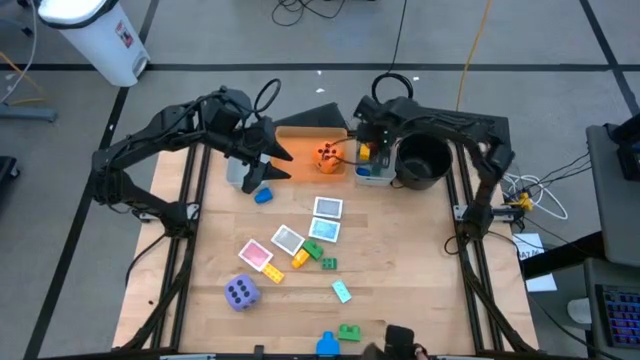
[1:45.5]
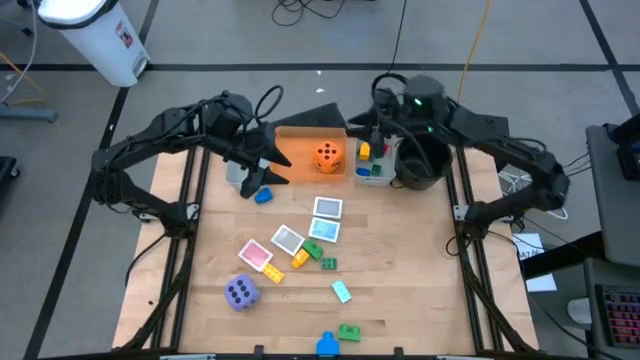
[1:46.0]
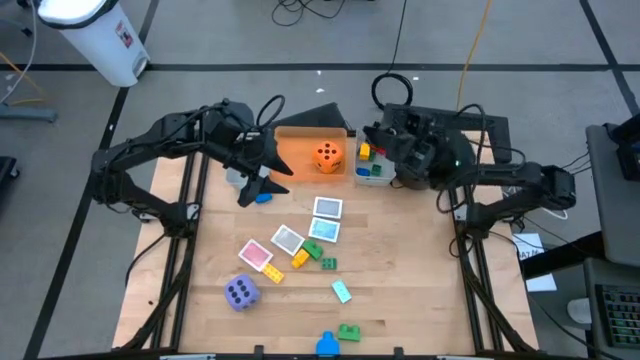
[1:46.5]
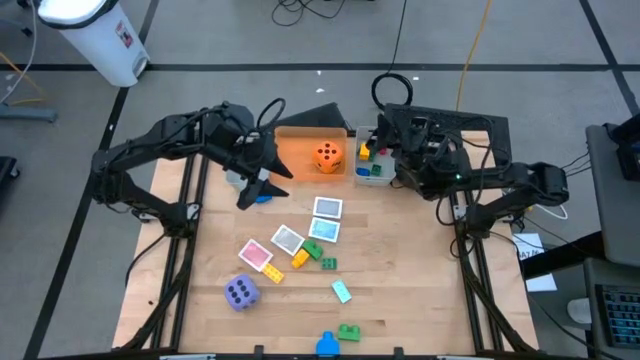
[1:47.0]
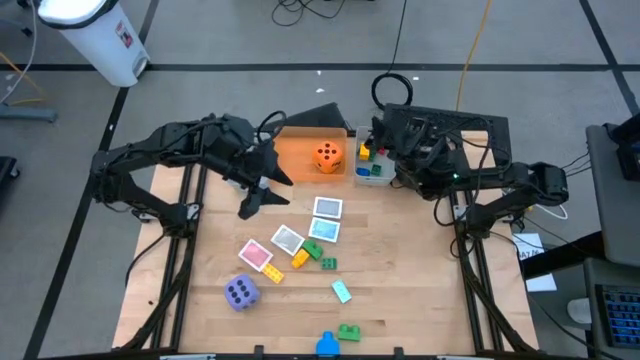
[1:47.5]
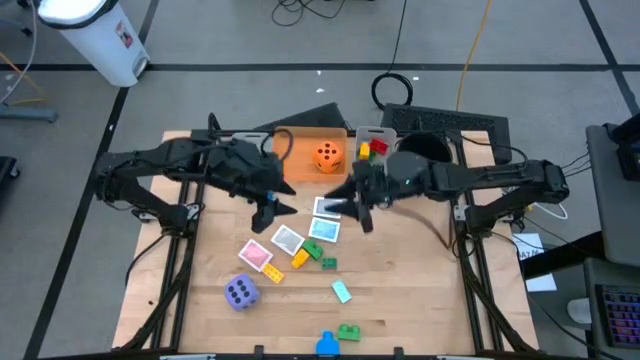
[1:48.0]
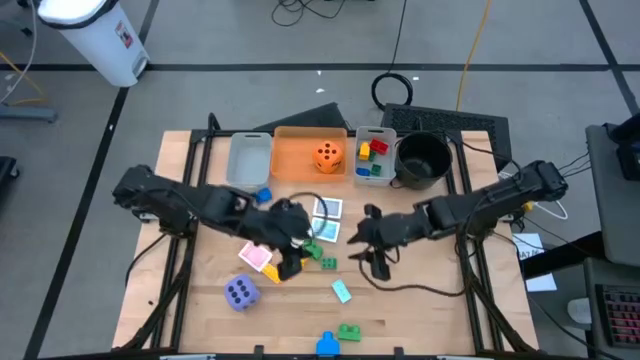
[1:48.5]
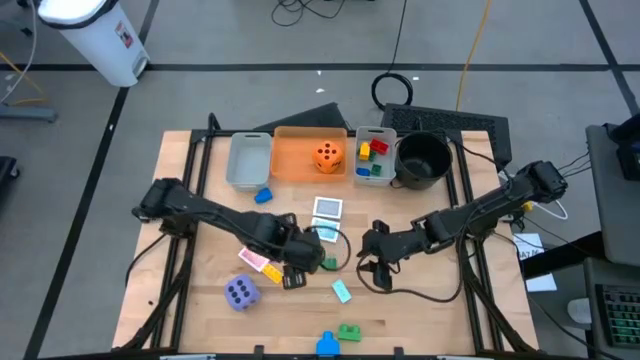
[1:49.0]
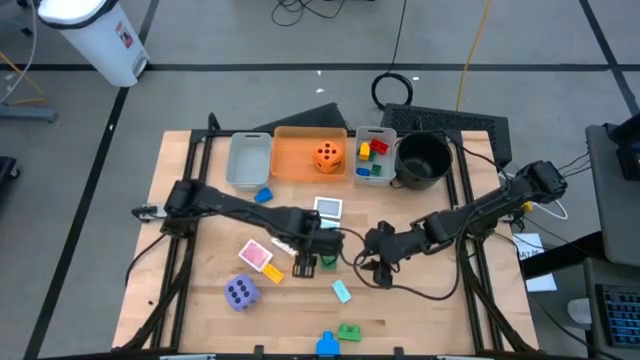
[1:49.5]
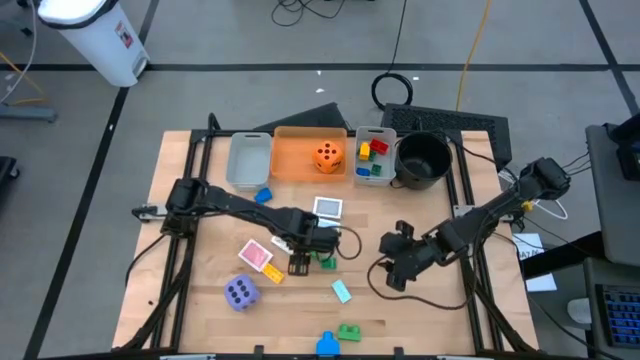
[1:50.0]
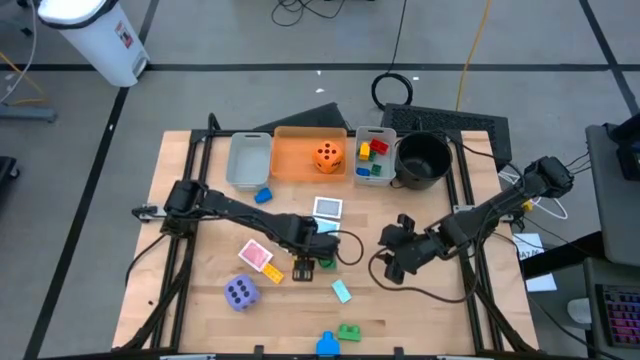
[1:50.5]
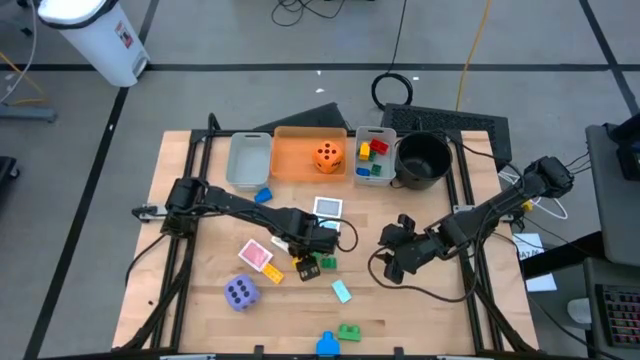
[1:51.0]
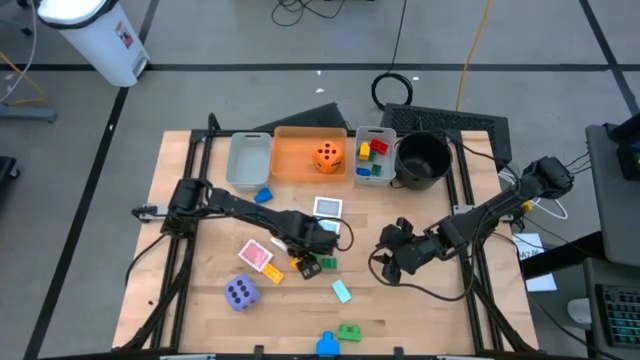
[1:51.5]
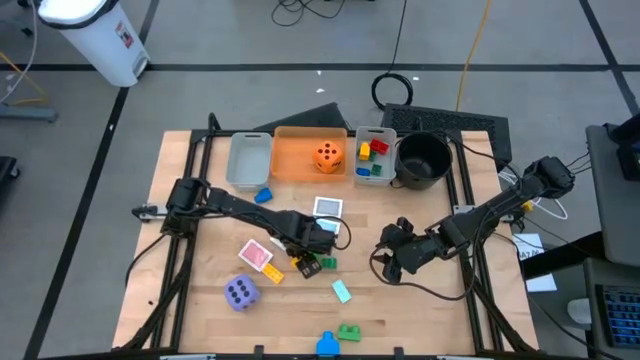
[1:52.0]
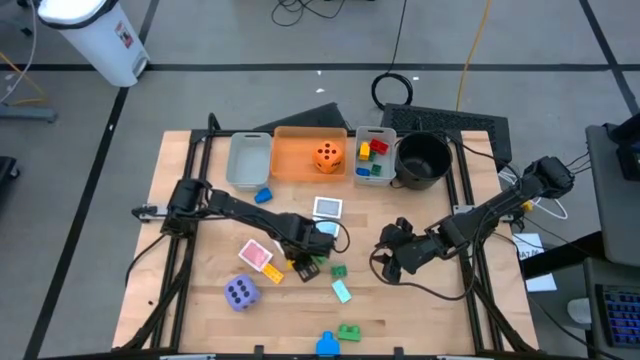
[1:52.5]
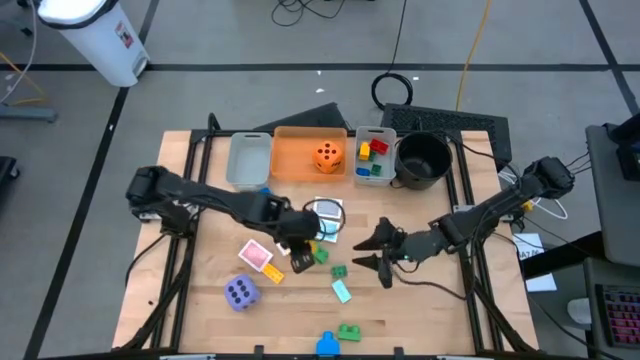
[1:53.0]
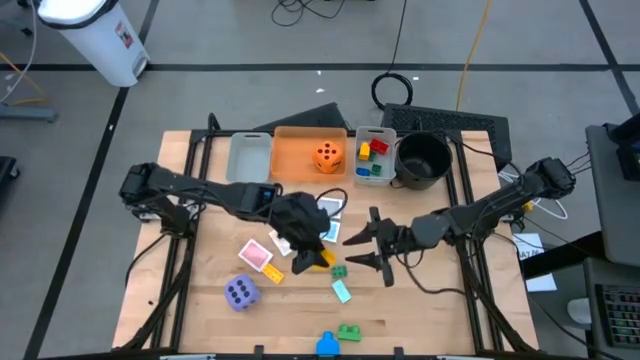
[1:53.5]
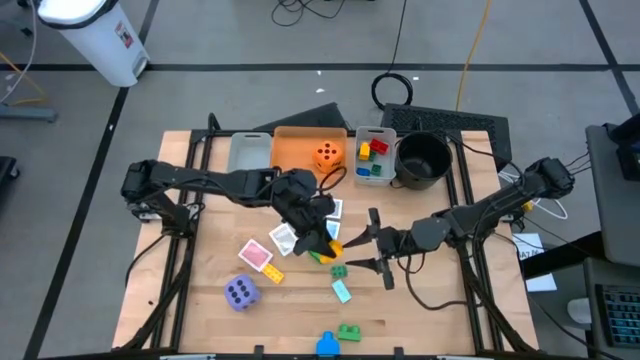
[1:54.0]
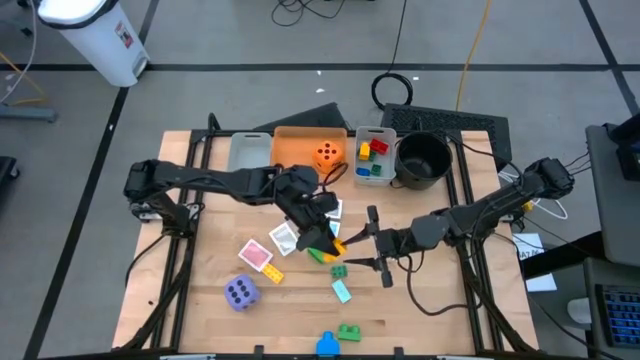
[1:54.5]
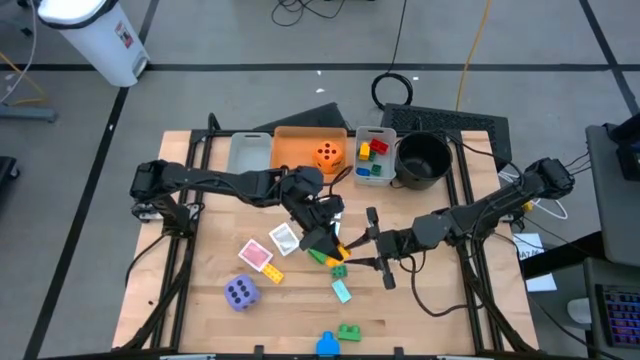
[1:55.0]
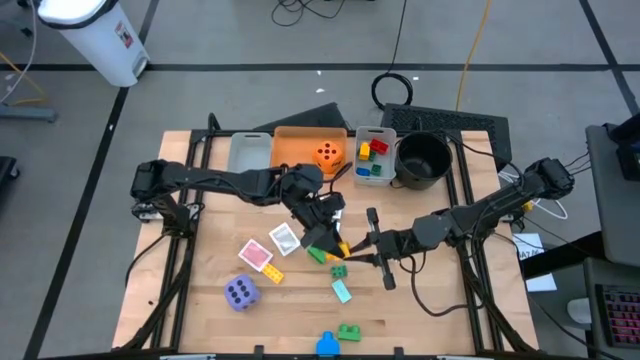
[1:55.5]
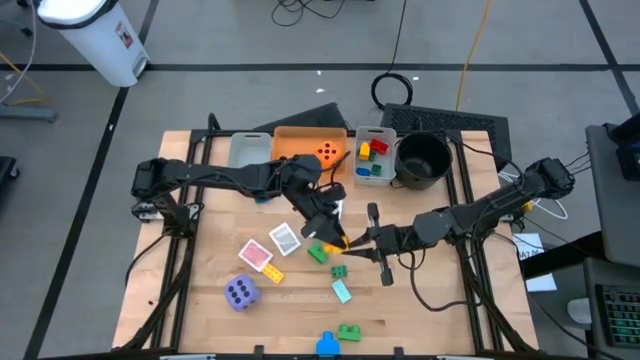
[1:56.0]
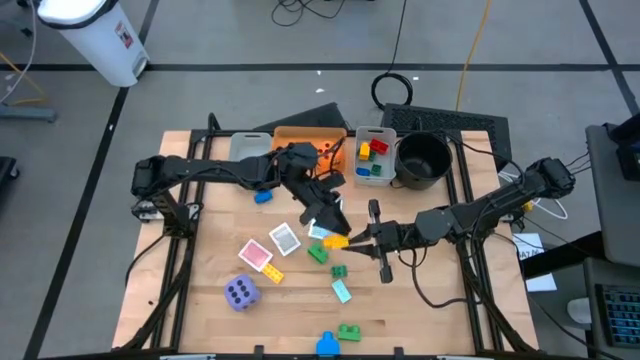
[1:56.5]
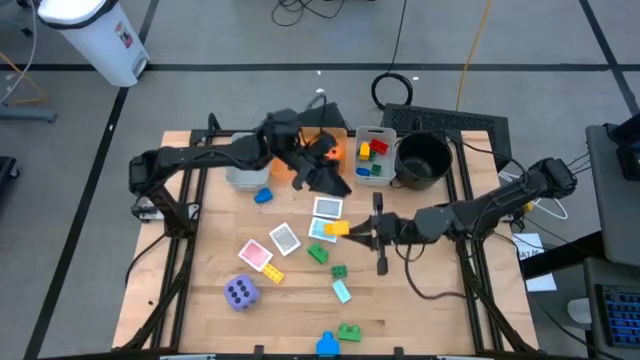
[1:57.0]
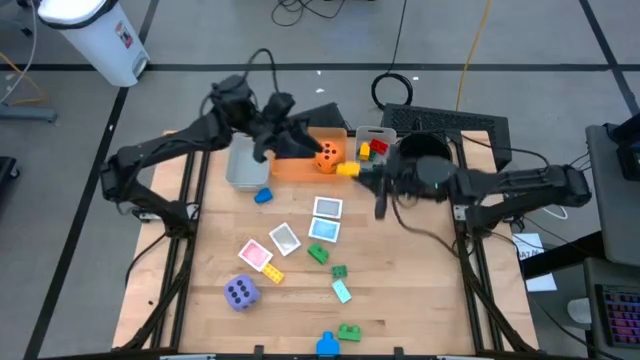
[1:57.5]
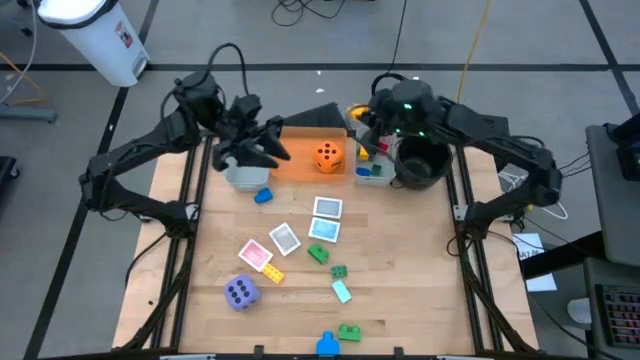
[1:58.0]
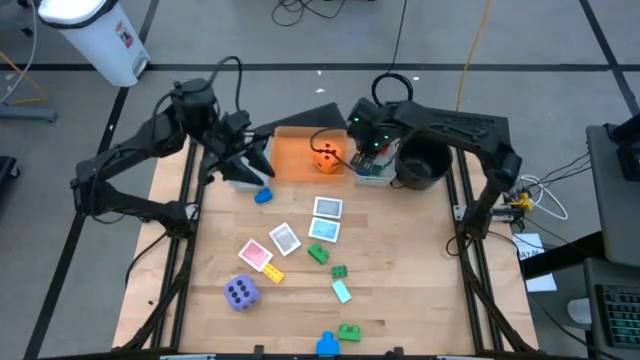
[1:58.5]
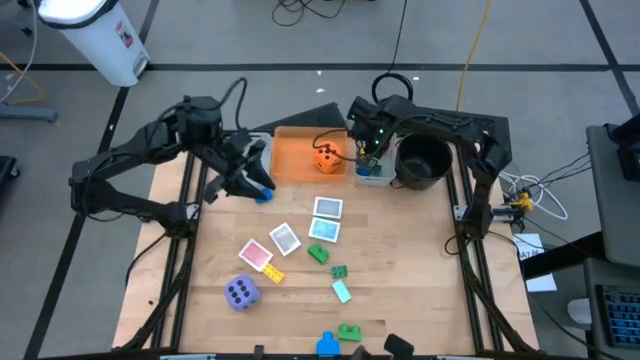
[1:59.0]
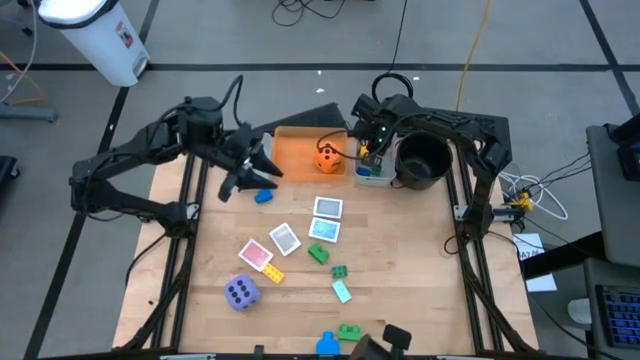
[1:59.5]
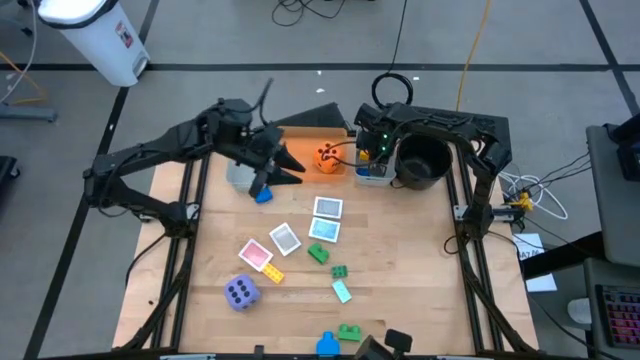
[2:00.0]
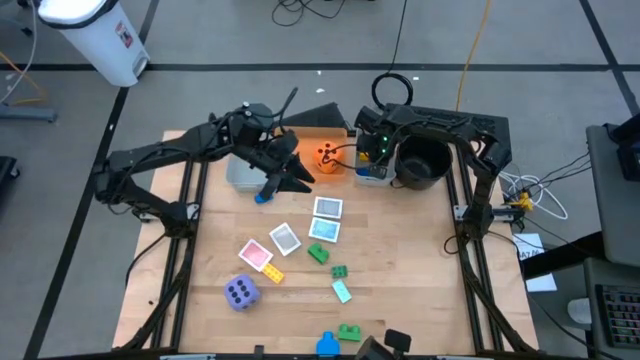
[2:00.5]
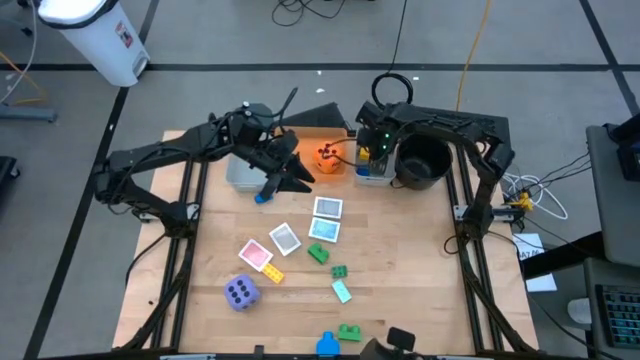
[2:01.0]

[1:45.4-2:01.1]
Task: Pick & Place Toys
Put the yellow game piece into the right gray bin

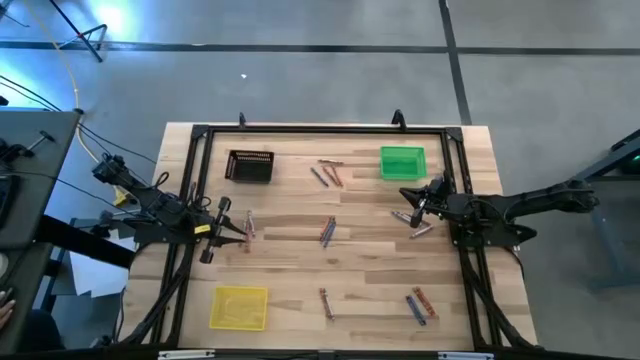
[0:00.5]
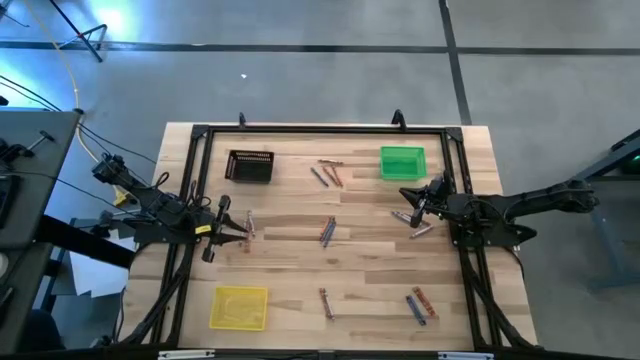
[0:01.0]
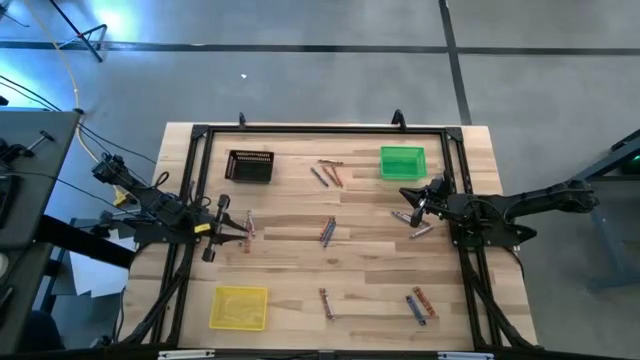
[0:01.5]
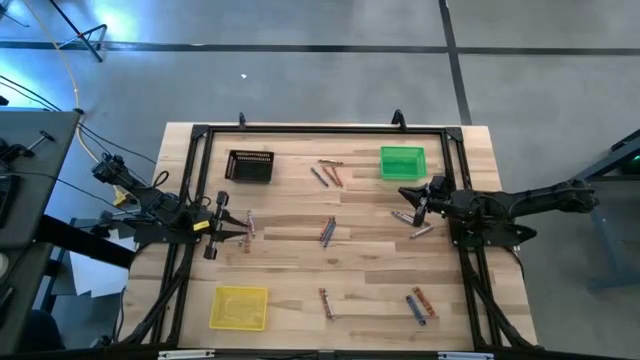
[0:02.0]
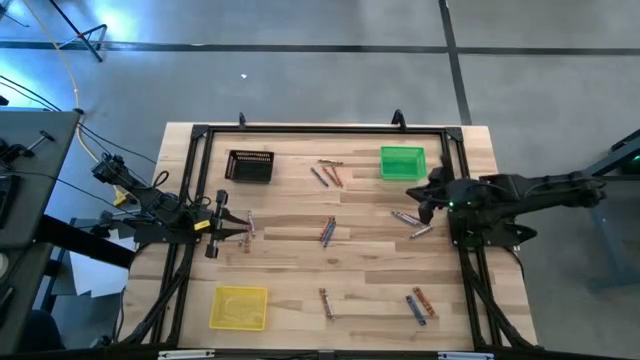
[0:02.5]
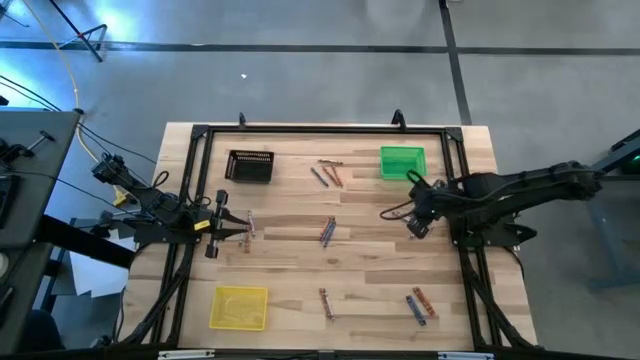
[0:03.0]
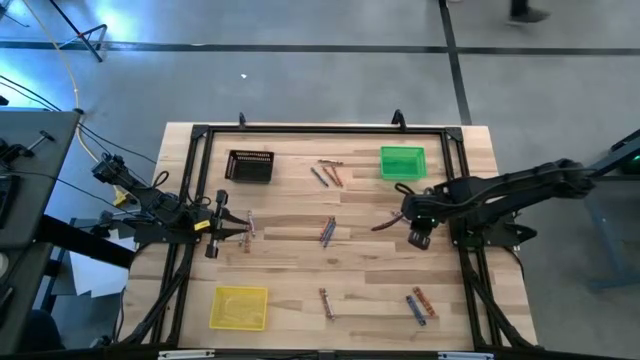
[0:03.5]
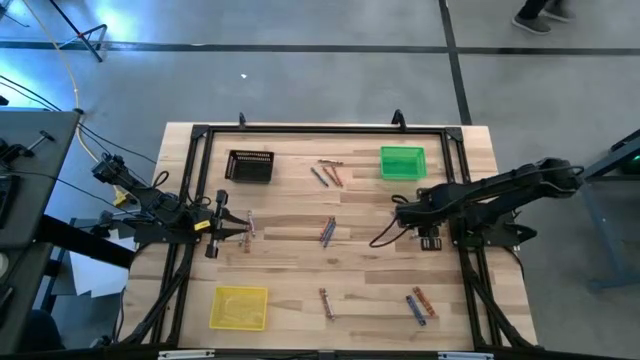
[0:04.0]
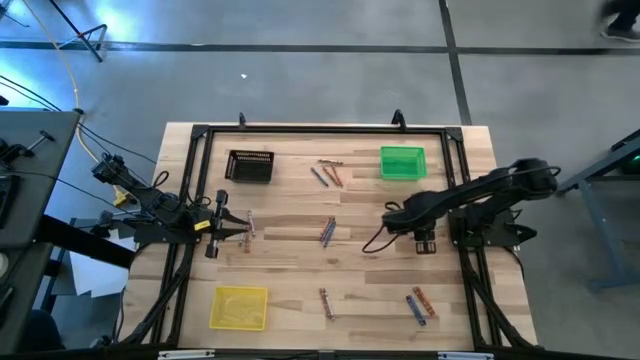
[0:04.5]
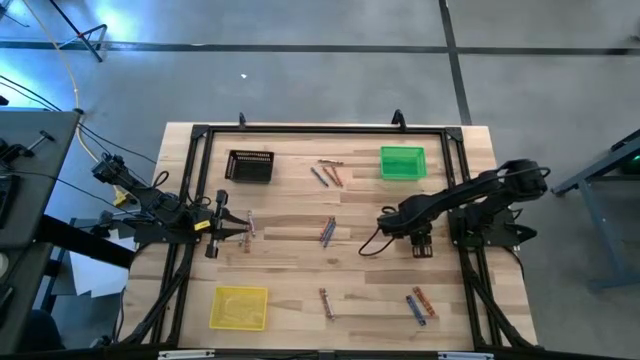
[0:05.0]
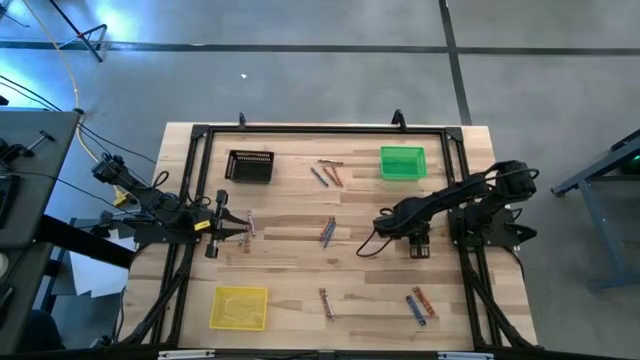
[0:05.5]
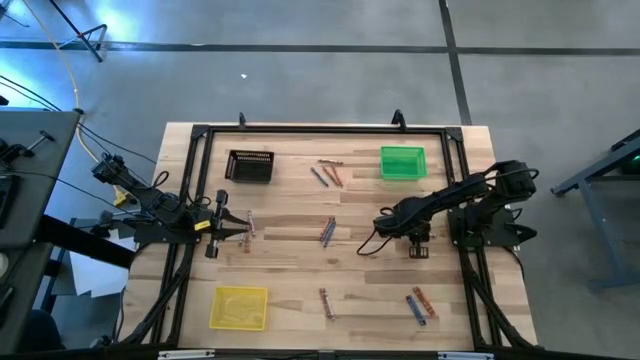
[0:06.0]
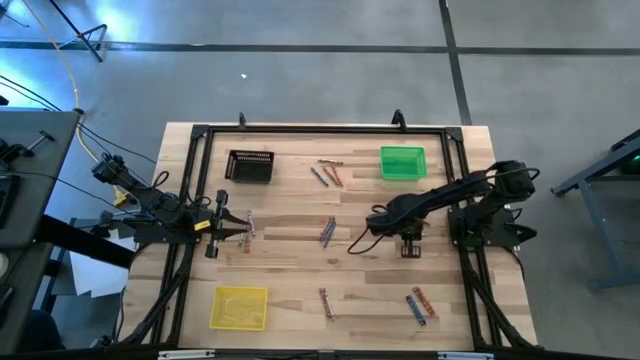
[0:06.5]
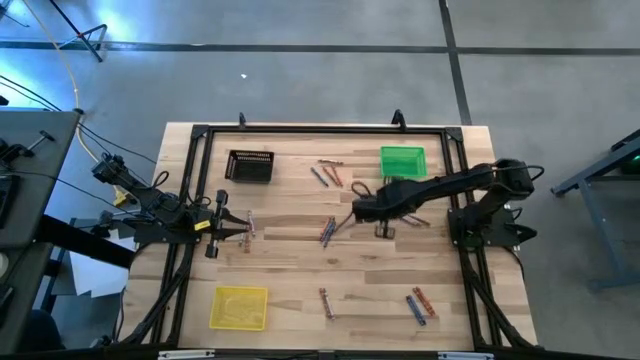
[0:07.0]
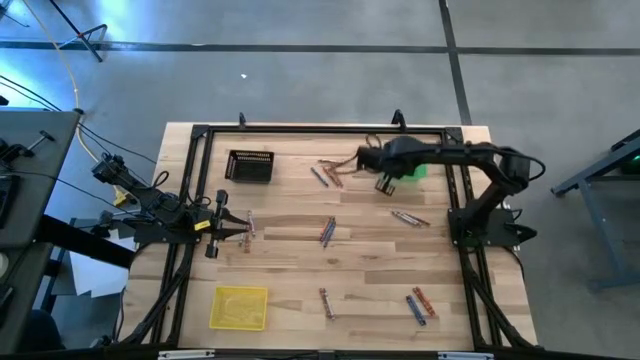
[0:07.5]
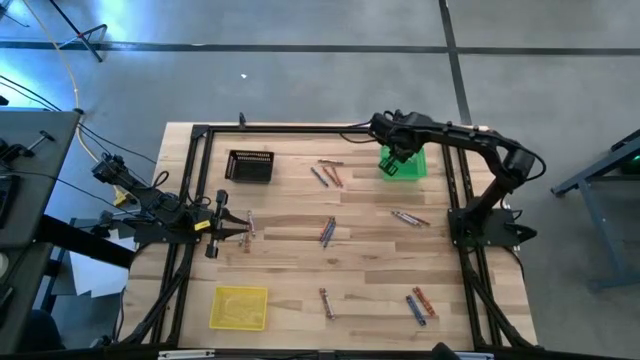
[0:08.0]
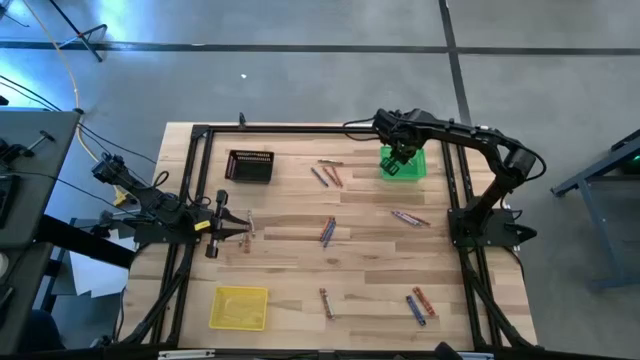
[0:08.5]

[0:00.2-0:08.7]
Task: Sort crayons
Put the gray crayon into the green bin
